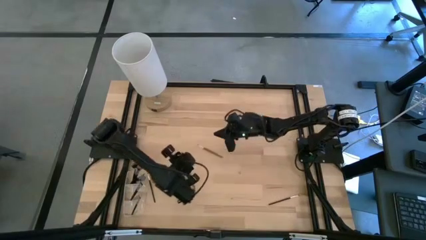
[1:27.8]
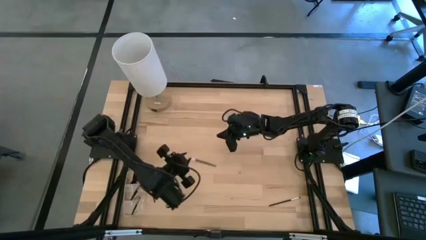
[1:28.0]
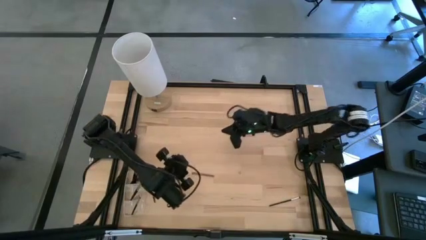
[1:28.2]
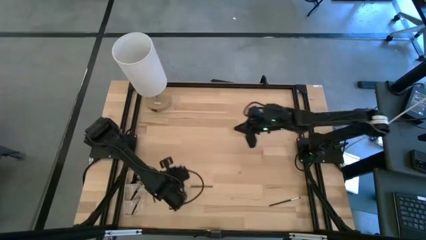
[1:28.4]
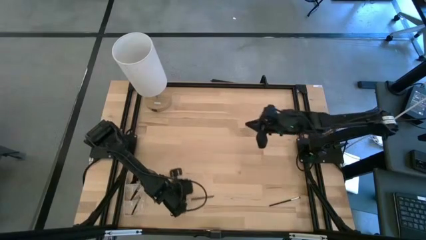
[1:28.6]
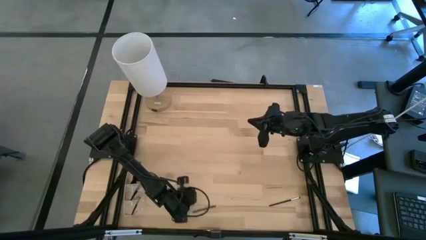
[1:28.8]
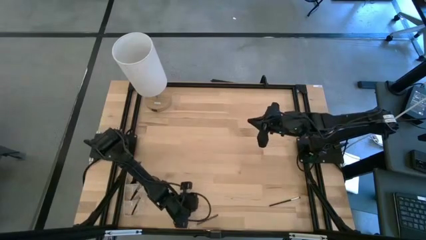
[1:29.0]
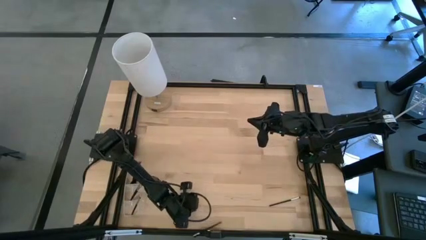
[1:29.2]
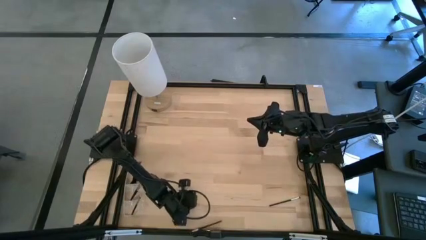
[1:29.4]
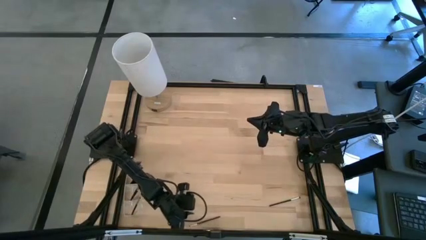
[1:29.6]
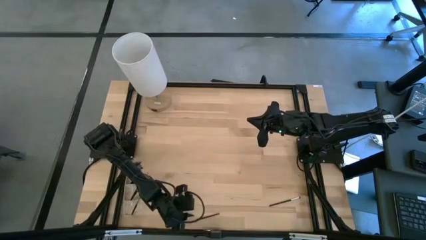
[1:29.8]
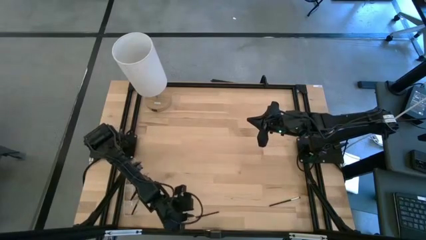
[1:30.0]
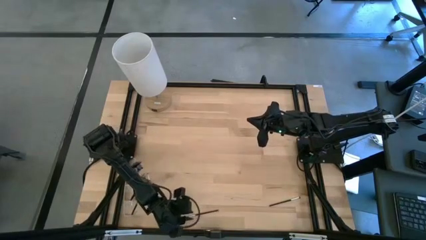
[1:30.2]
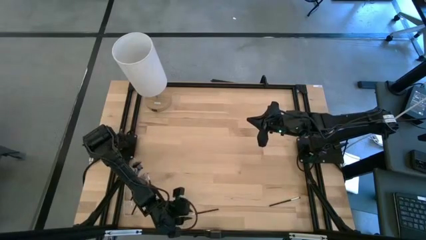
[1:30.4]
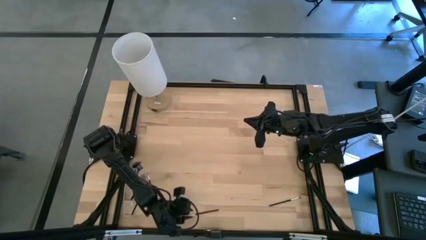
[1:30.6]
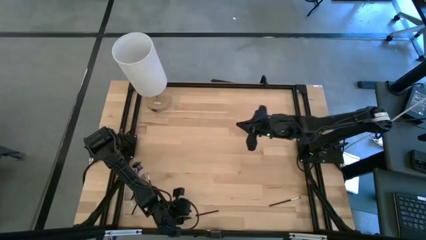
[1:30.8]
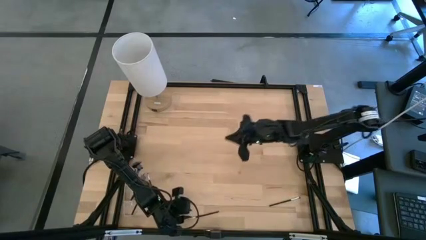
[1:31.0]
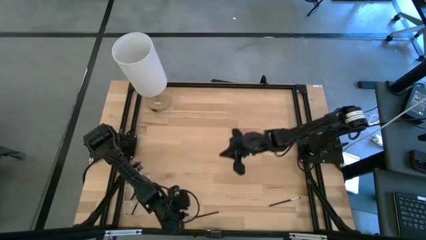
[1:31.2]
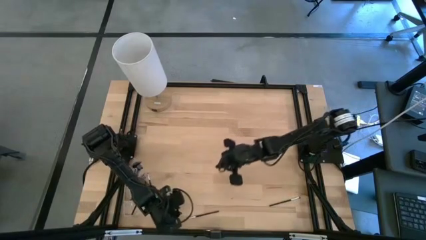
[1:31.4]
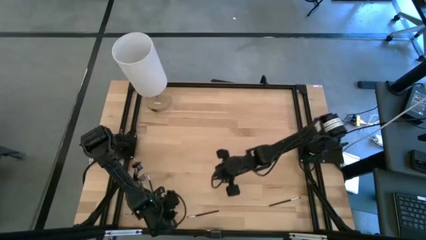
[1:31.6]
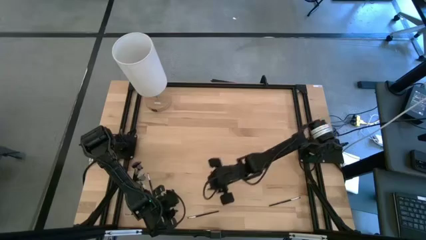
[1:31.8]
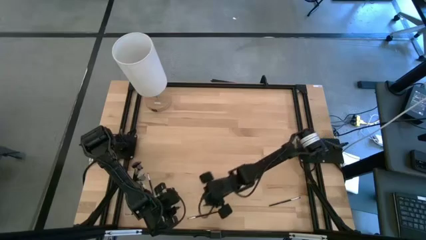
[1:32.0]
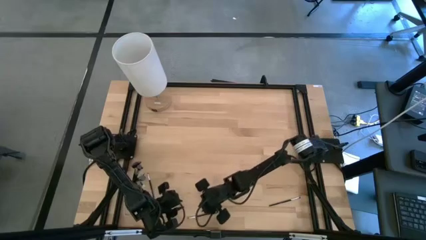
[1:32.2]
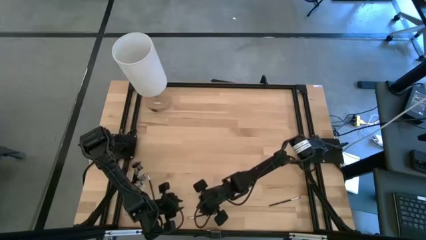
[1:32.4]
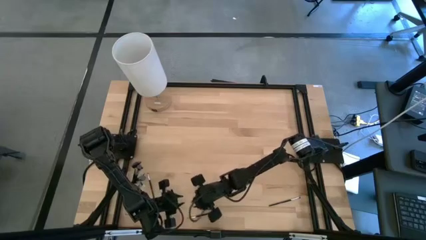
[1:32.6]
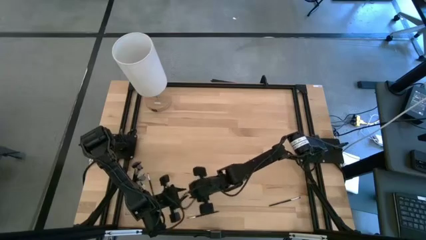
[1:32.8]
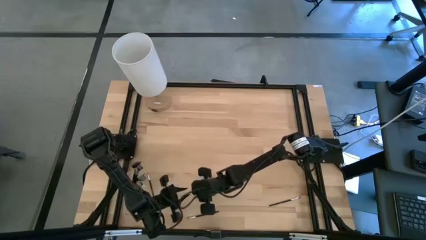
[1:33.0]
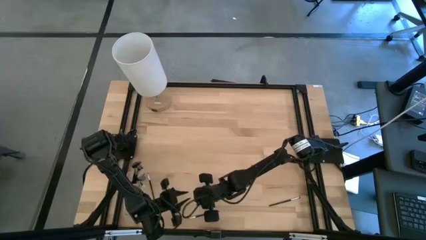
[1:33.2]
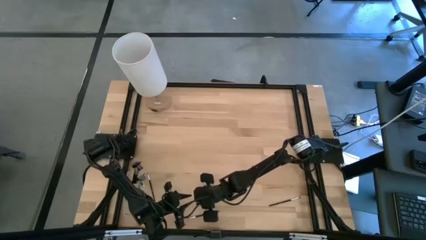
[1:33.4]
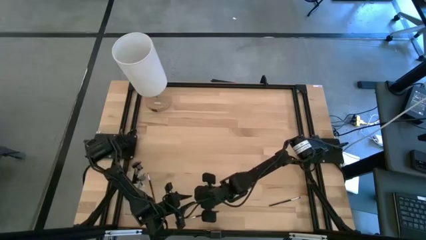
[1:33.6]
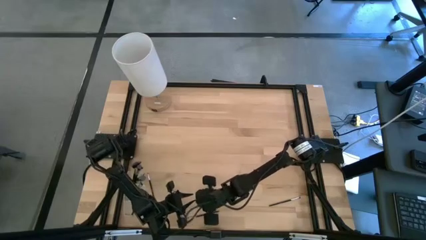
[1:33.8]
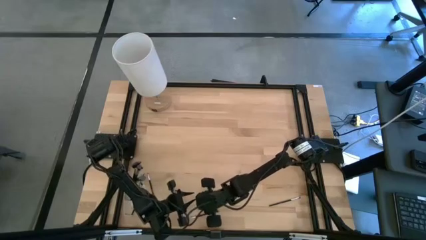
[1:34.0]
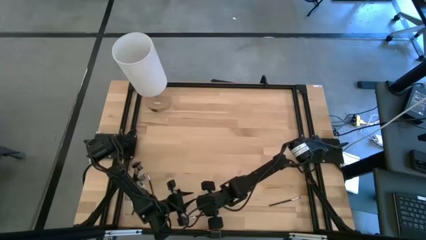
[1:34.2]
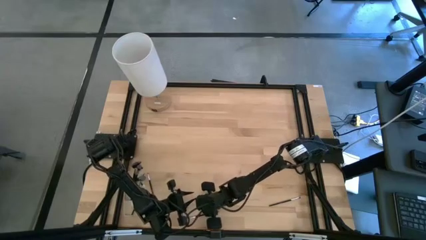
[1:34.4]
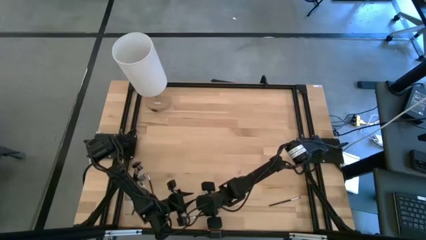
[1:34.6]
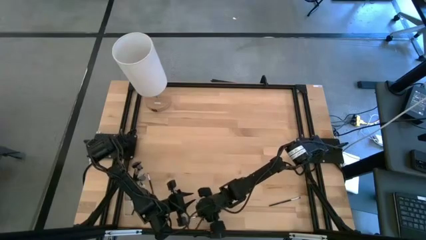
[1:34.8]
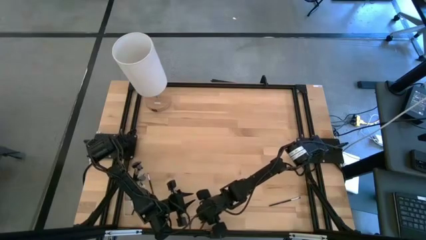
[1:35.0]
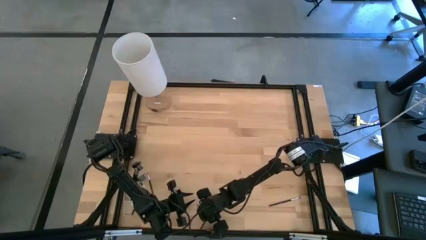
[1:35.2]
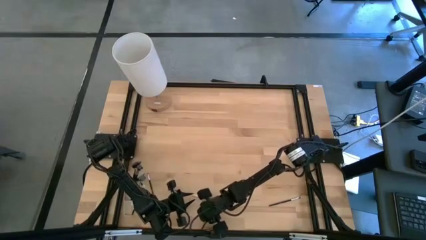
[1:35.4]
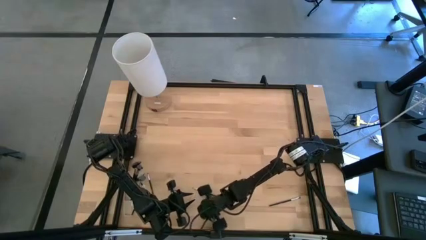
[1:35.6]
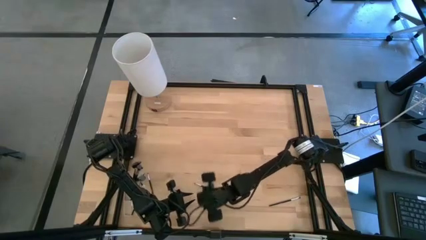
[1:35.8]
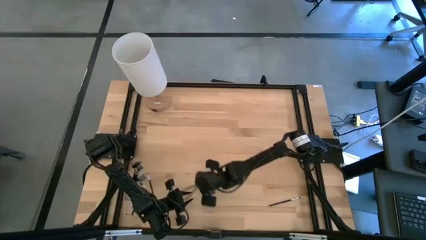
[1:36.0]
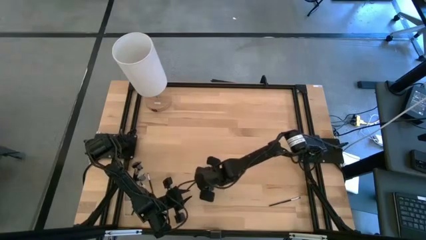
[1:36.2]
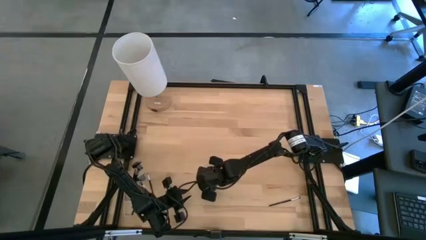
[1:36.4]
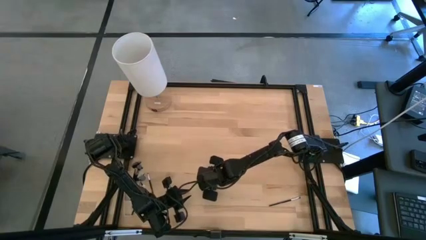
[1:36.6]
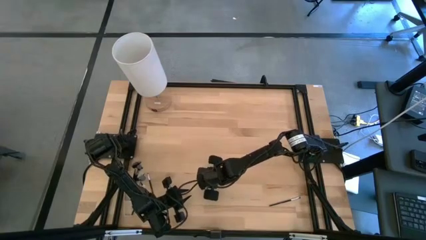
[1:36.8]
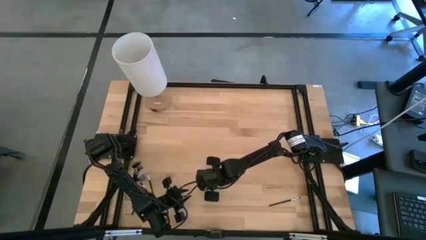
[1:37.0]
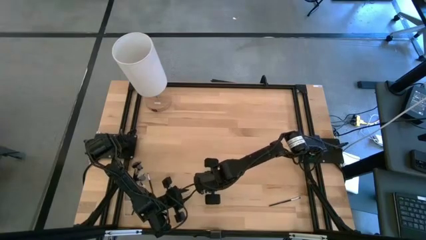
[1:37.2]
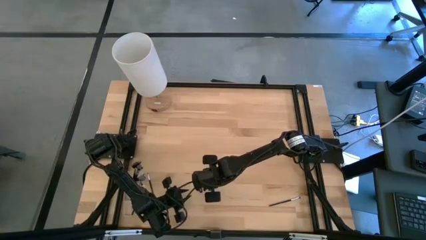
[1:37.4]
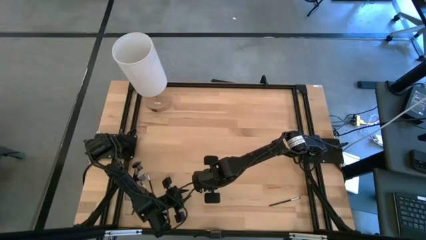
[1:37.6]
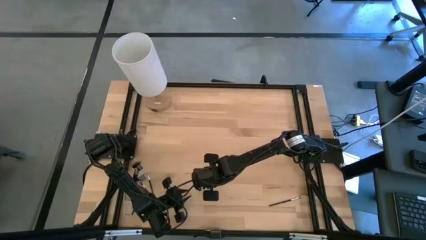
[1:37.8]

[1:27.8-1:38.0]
Task: Pick & Place Makeup Supplies
Put the top makeup brush into the transparent organizer
